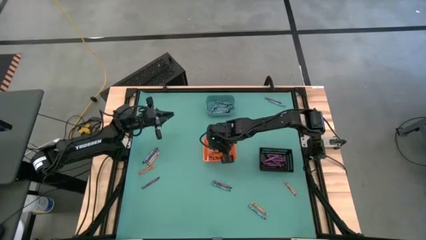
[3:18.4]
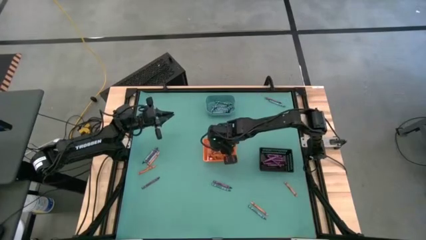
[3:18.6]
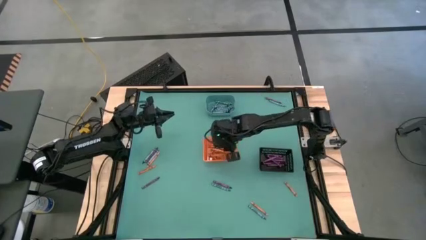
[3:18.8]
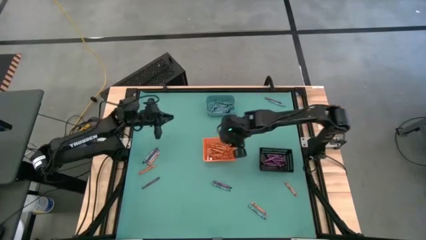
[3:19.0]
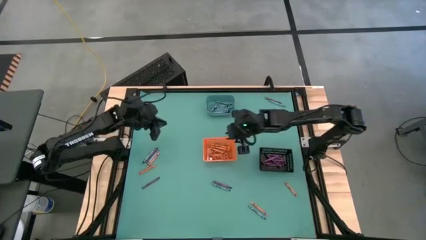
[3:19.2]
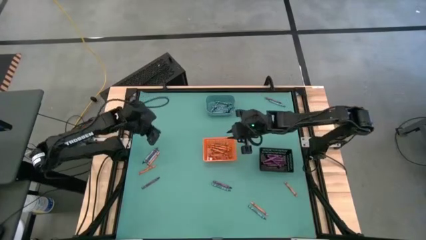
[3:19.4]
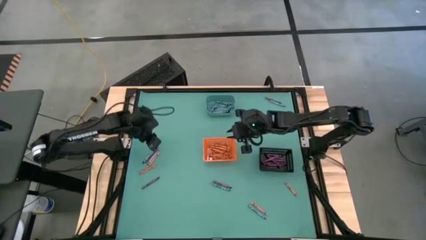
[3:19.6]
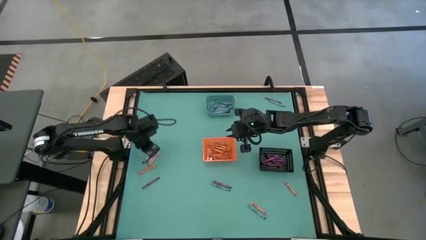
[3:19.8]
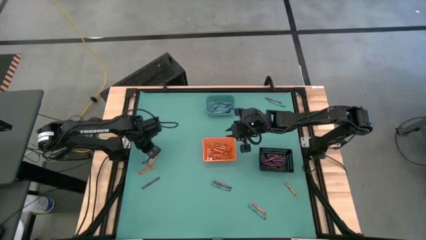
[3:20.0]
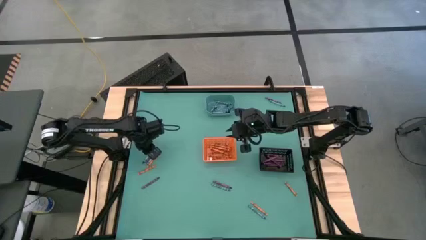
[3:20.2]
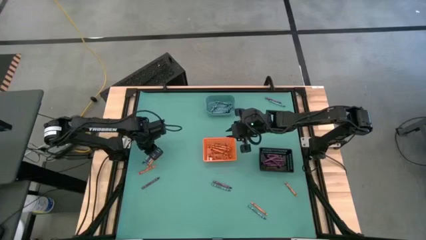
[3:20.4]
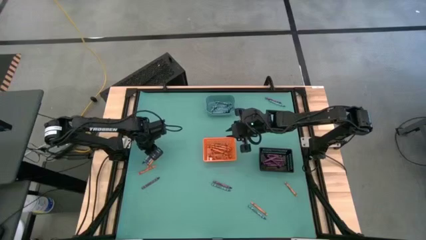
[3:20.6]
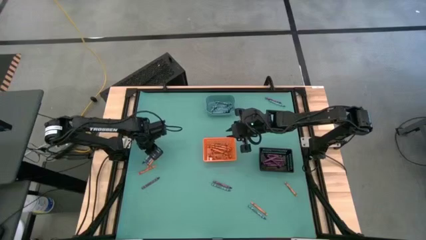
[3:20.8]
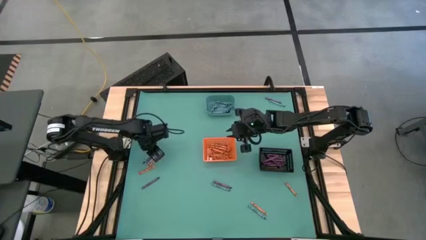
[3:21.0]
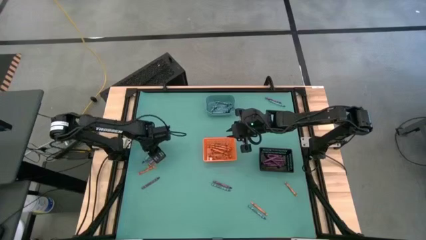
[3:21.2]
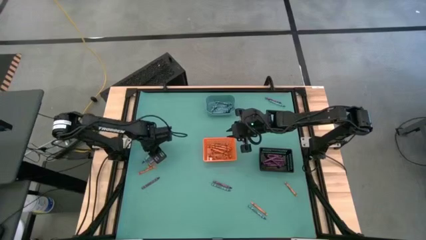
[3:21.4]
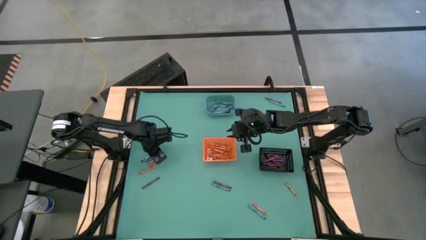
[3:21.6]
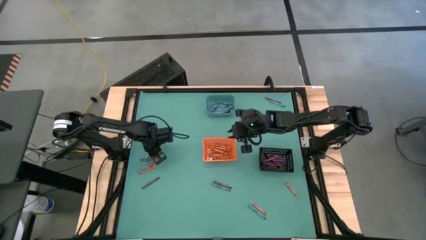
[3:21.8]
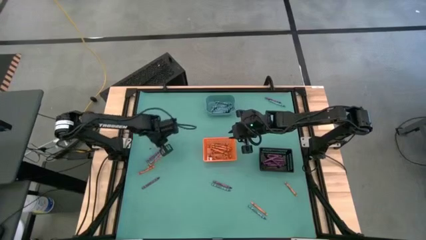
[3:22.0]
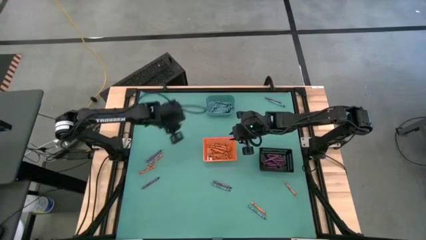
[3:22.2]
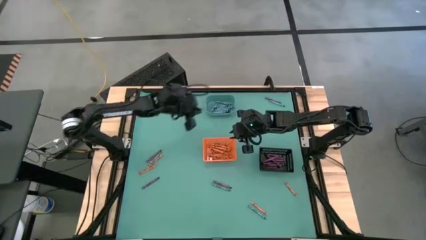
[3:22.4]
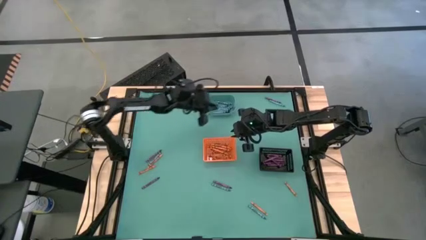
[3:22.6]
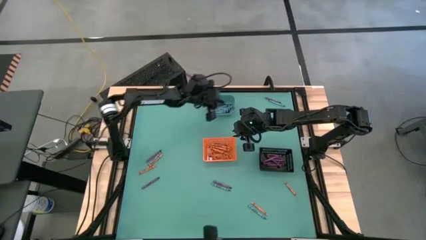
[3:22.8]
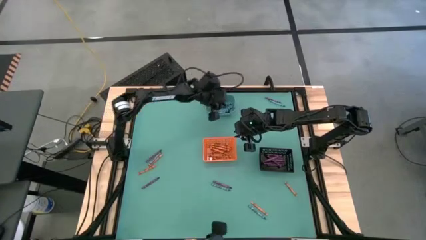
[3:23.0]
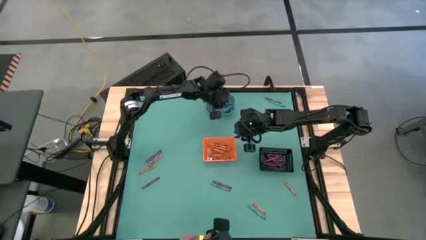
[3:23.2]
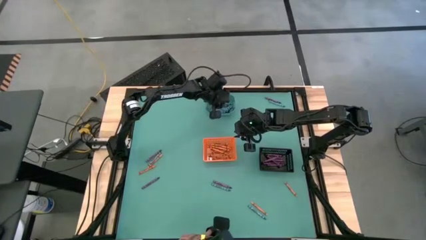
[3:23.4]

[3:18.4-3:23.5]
Task: Sort crayons
Put the blue crayon into the blue bin

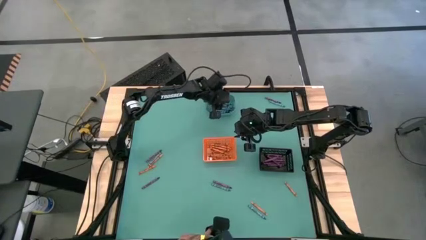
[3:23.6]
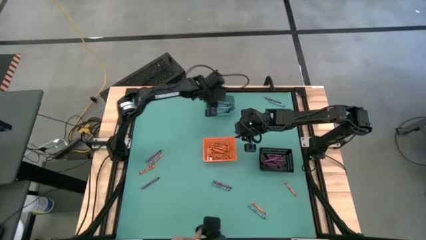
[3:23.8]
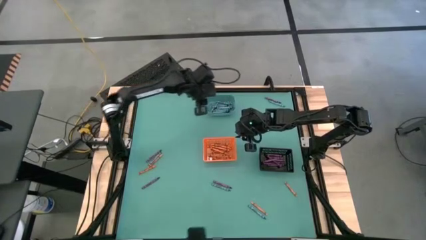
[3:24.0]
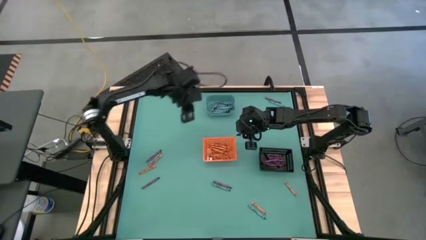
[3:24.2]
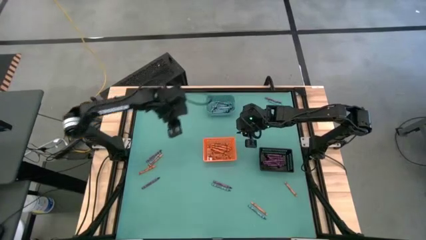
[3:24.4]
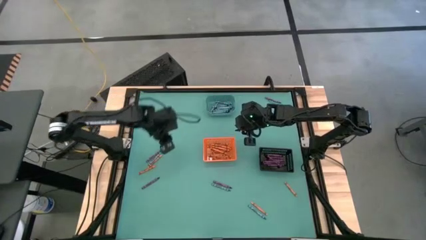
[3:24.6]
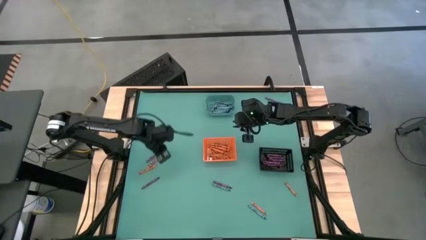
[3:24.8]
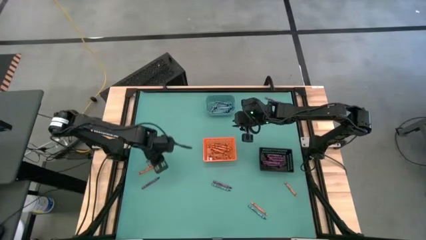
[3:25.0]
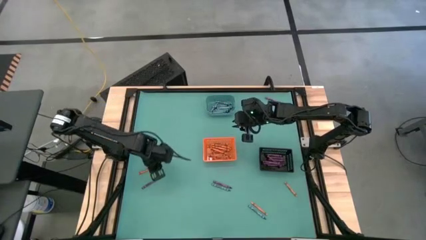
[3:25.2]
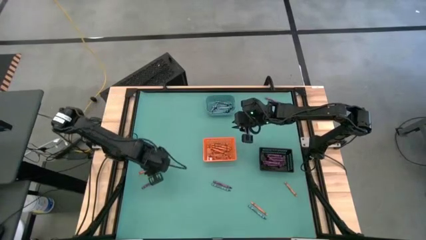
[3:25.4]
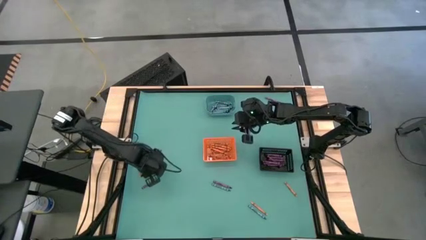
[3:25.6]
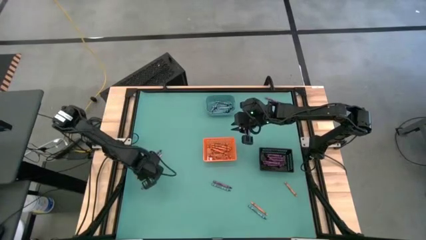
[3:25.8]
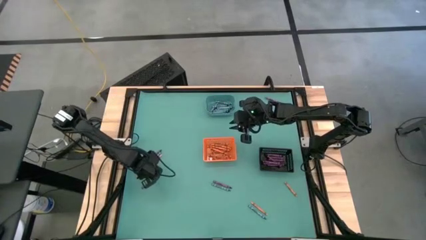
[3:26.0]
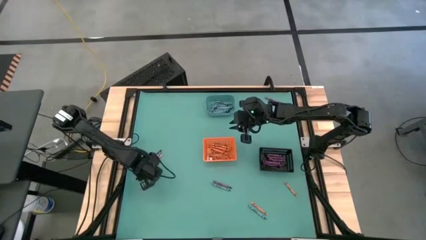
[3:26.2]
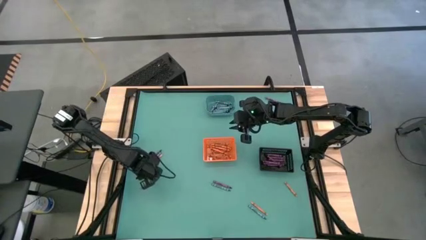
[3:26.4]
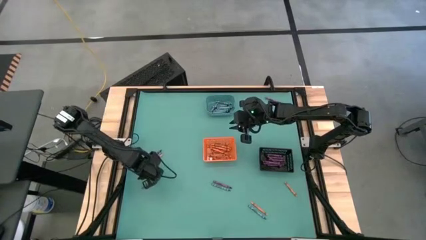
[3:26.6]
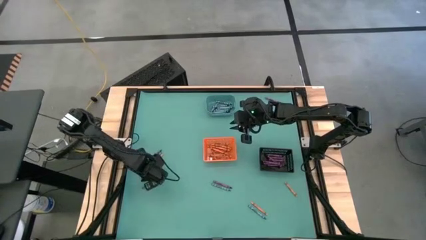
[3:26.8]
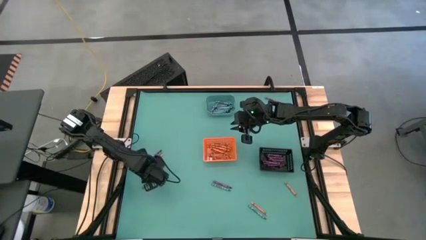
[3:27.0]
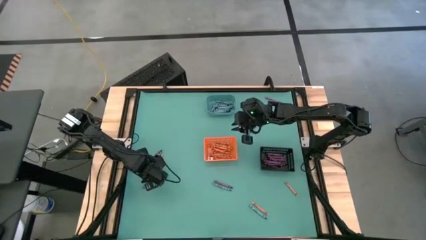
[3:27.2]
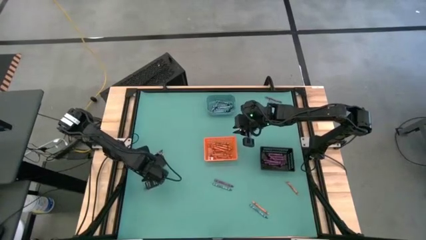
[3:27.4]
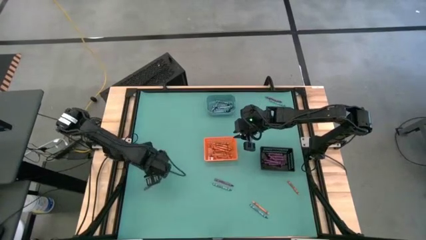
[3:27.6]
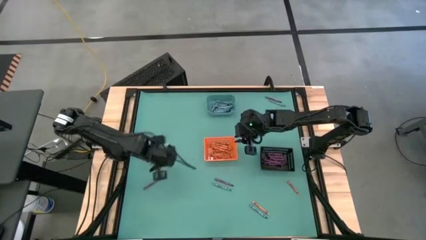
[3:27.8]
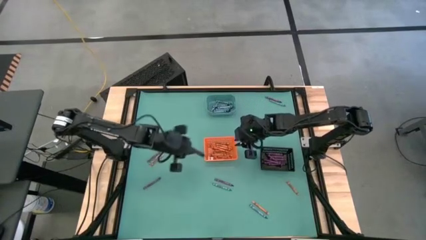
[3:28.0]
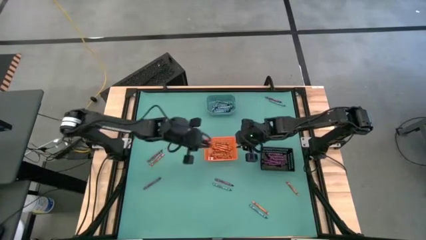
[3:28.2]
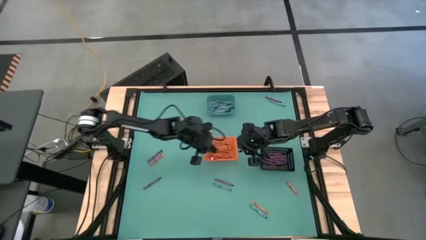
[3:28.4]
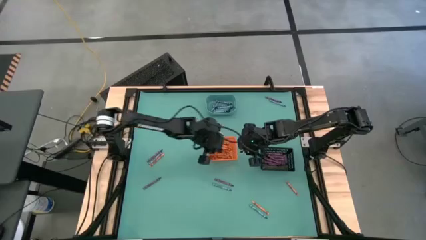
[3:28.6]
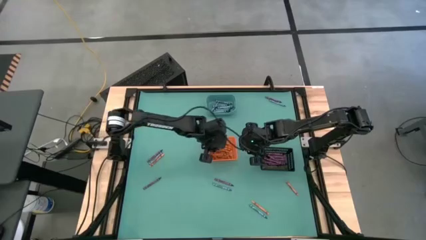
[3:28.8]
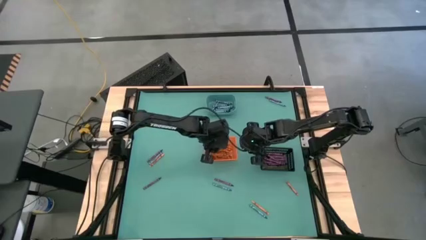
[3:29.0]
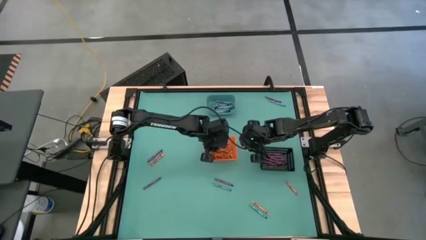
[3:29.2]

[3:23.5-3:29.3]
Put the orange crayon into the orange bin

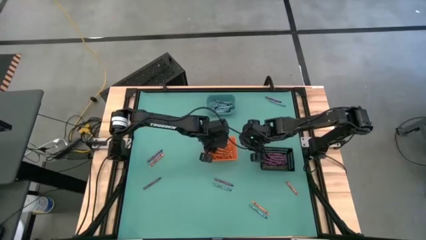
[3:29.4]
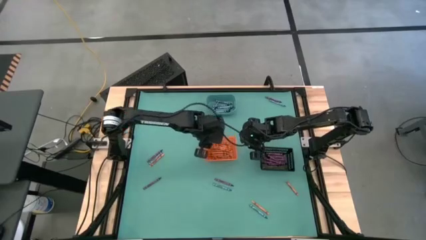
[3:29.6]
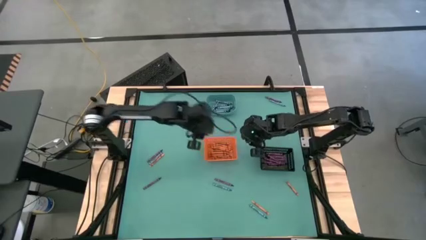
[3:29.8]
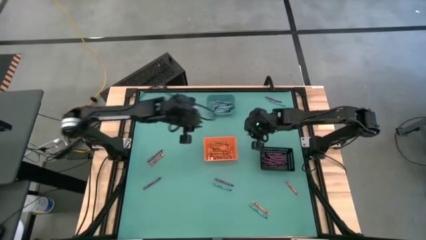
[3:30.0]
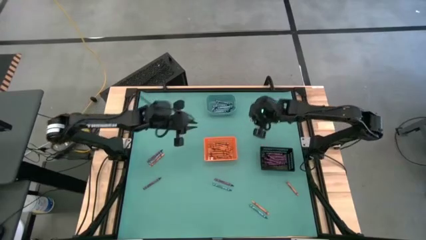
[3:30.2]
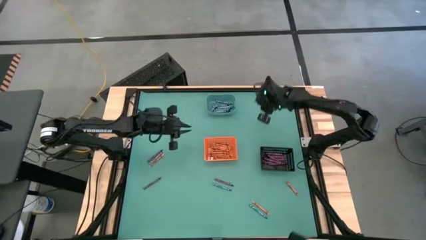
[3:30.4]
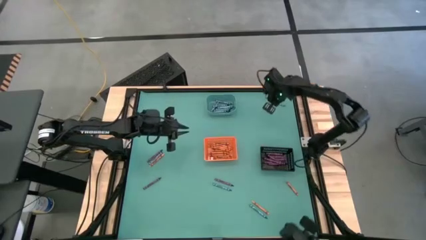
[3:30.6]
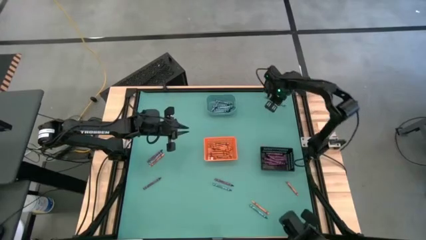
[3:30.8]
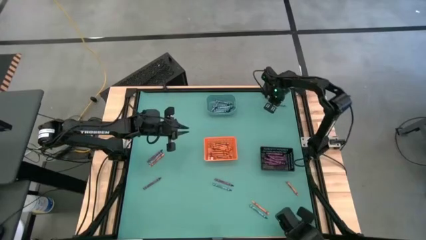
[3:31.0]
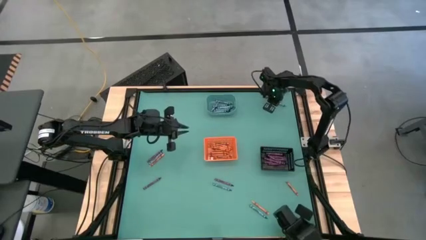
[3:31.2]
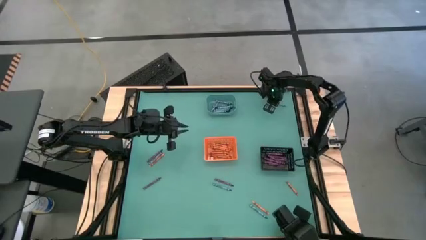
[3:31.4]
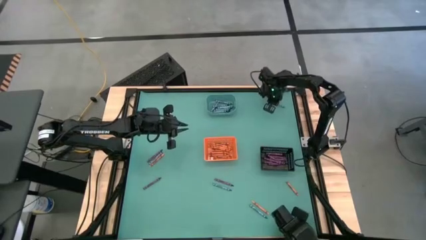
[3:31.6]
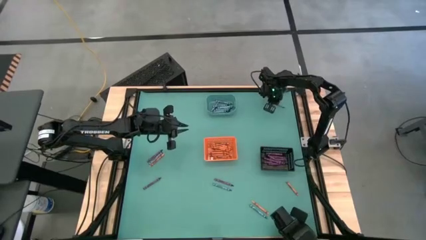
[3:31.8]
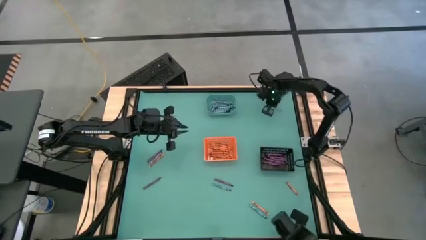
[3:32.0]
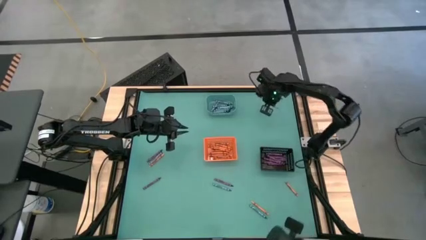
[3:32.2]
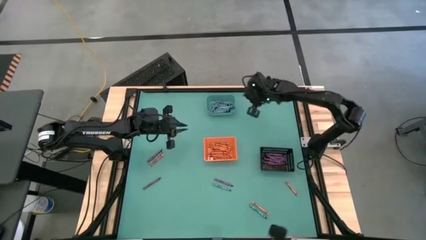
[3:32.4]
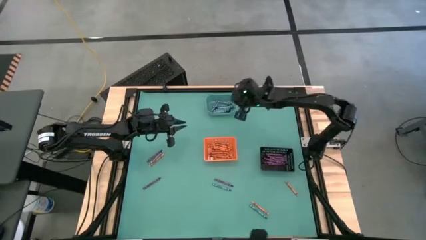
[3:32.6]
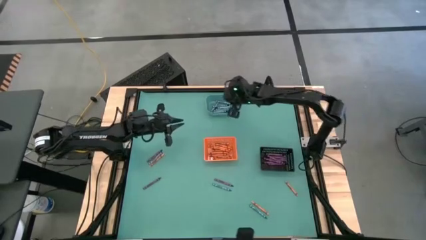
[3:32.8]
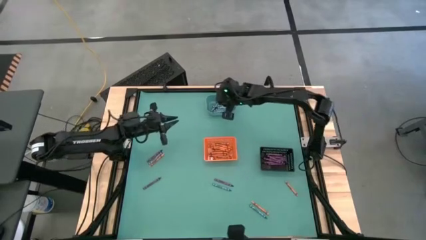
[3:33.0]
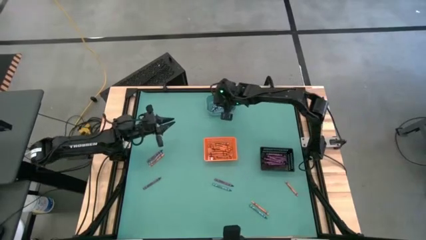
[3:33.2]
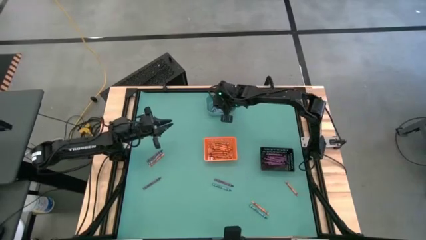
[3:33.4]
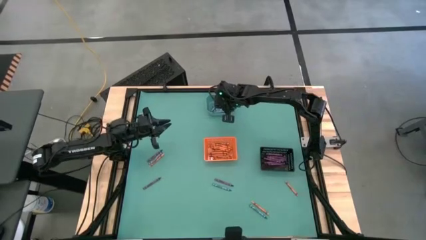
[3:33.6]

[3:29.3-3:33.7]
Put the green crayon into the blue bin
